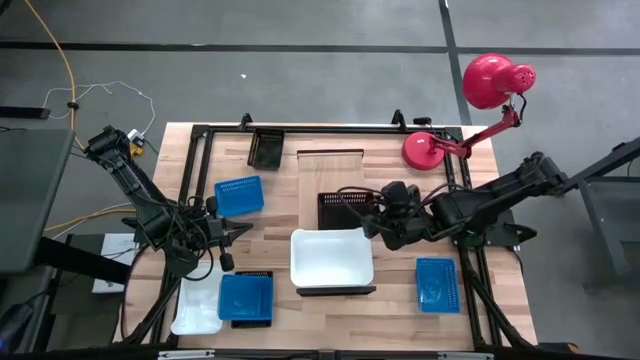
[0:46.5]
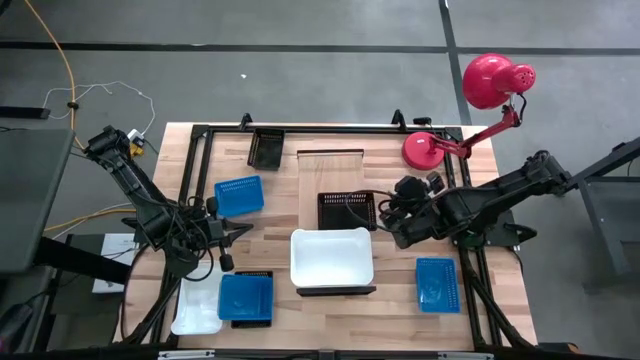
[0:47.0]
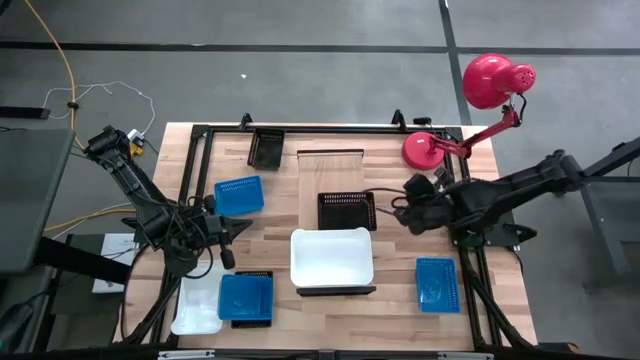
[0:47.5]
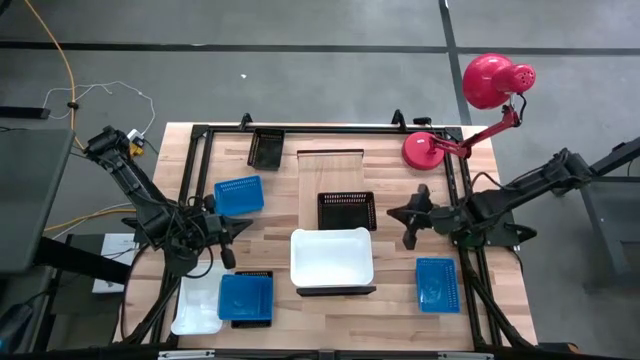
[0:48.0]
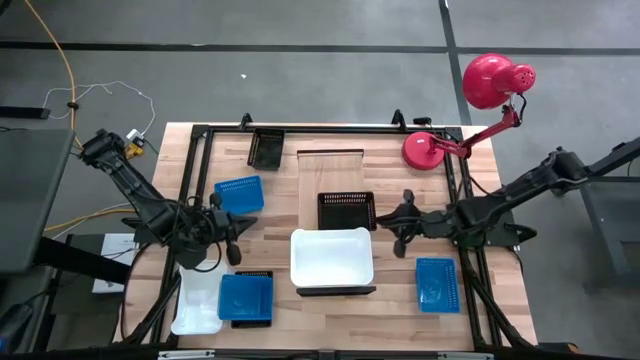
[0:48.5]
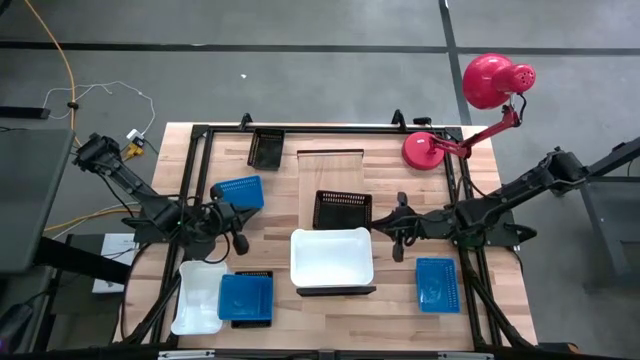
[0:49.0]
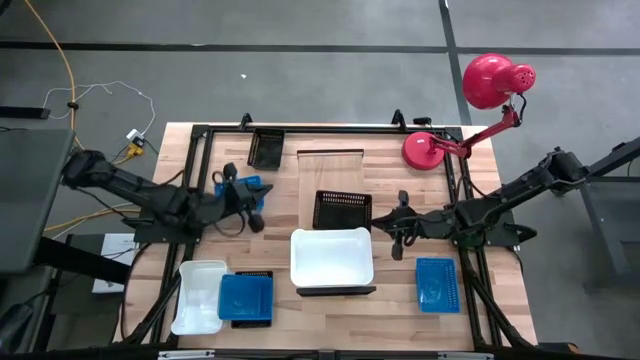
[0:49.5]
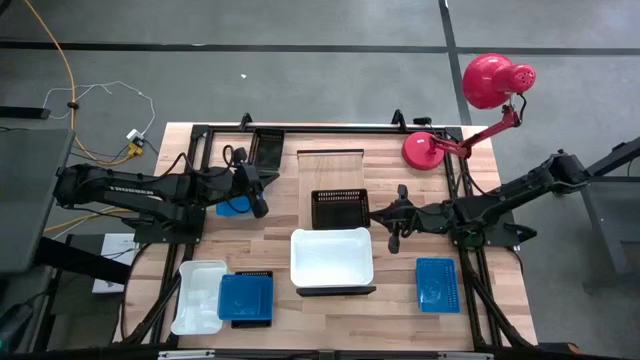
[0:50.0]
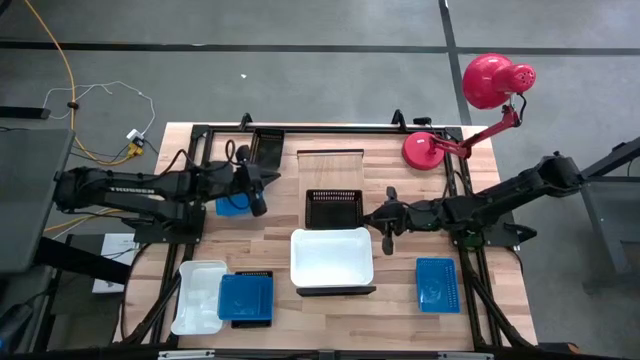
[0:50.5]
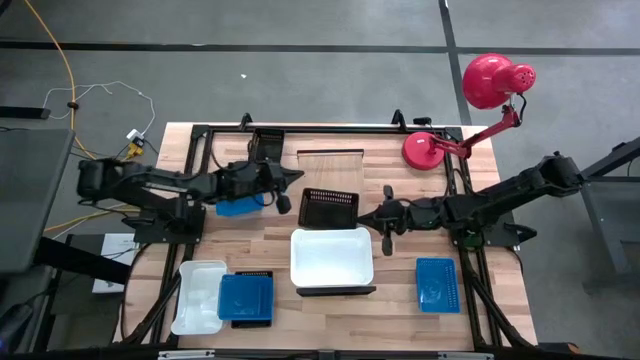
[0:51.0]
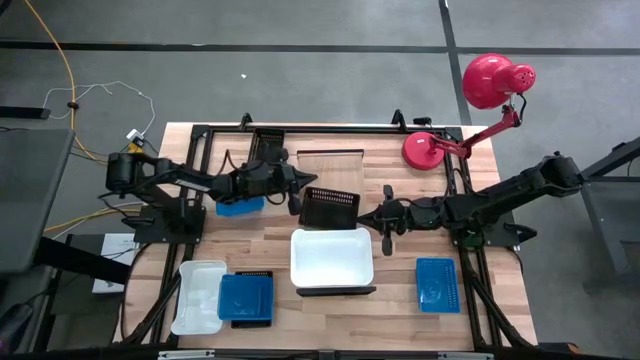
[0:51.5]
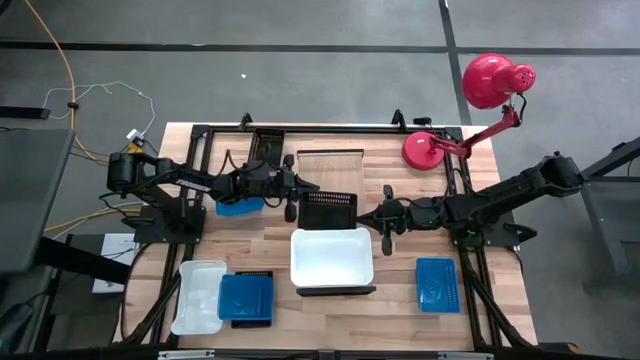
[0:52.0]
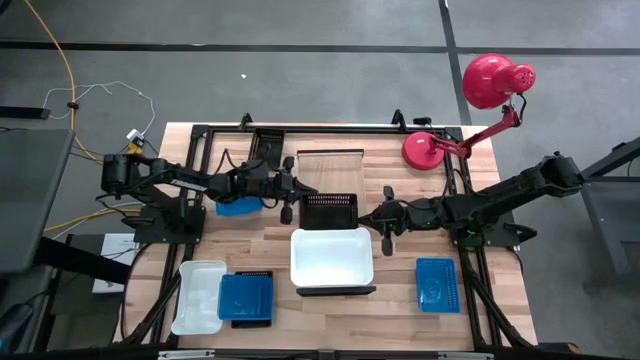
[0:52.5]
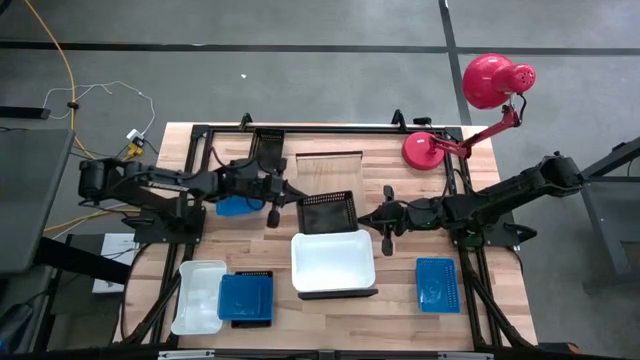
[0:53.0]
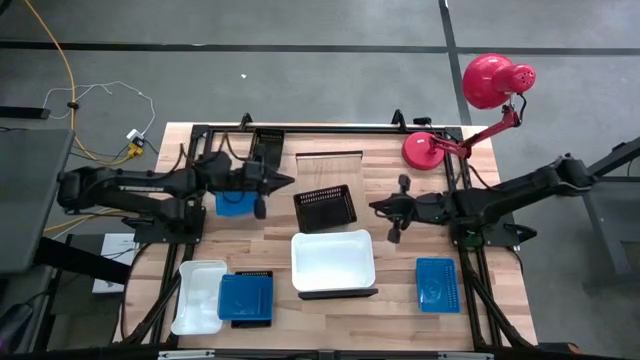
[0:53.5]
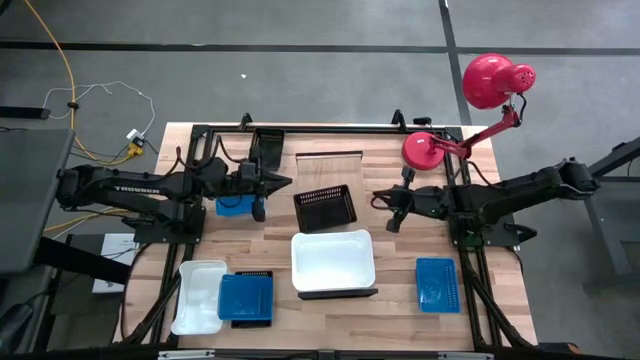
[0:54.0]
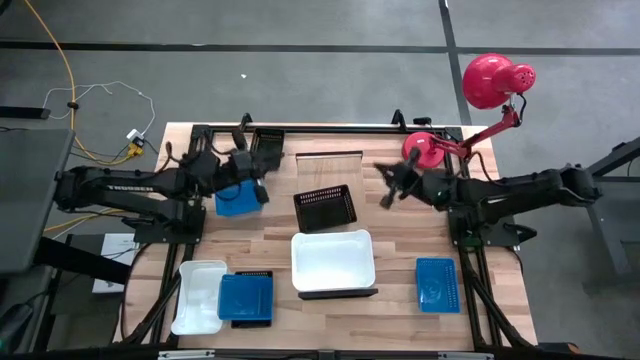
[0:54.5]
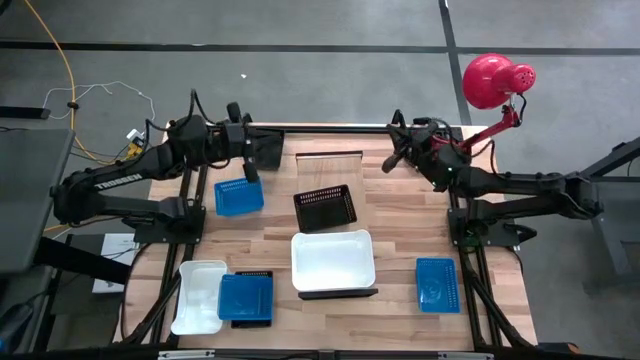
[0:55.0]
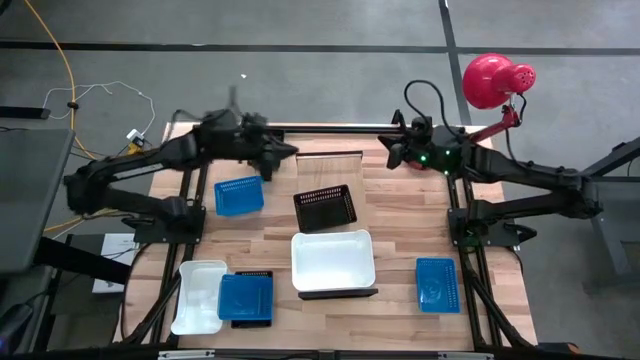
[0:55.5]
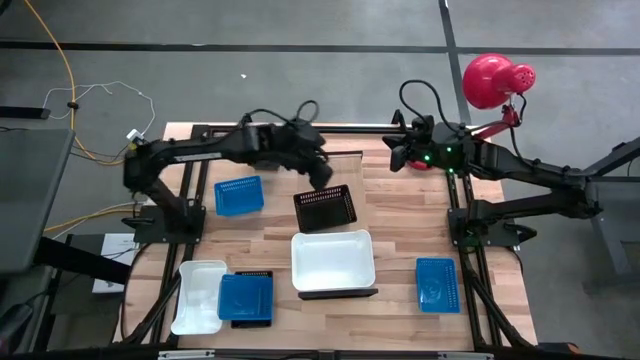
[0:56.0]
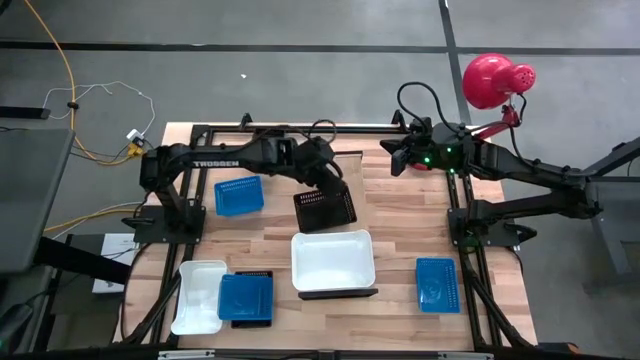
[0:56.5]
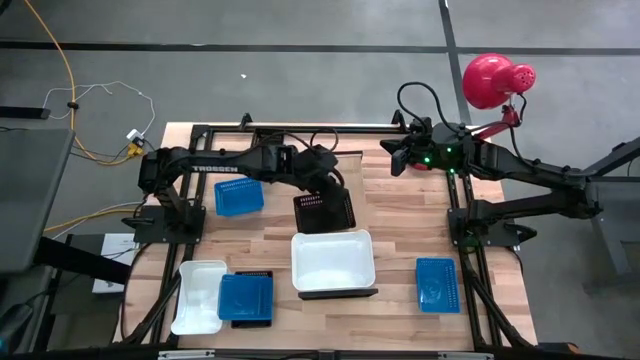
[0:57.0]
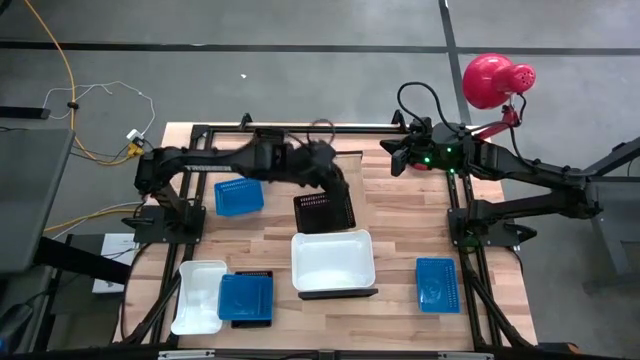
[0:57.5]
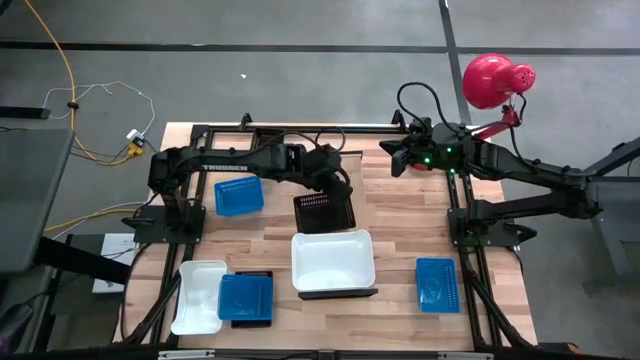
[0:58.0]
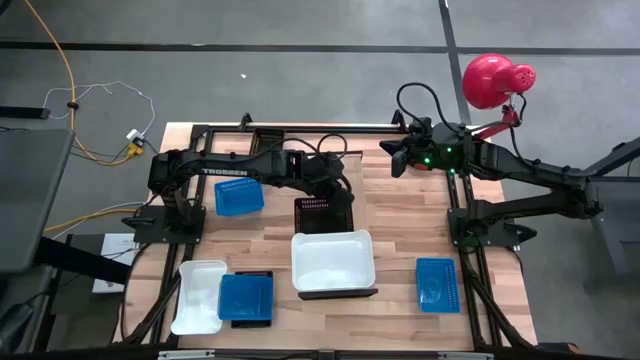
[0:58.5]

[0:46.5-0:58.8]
Task: Stack baskets on shelf by color
Put the right black bin on the shelf

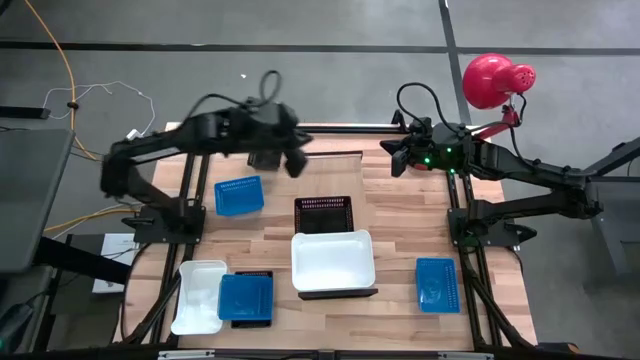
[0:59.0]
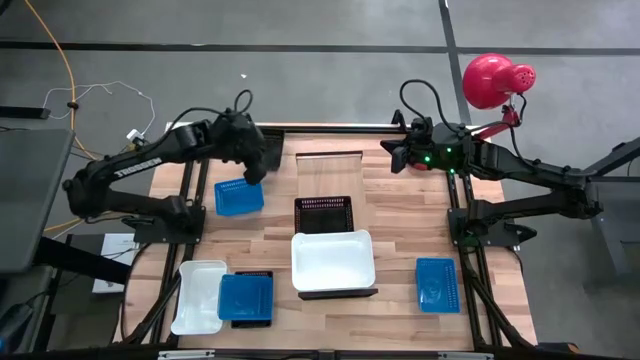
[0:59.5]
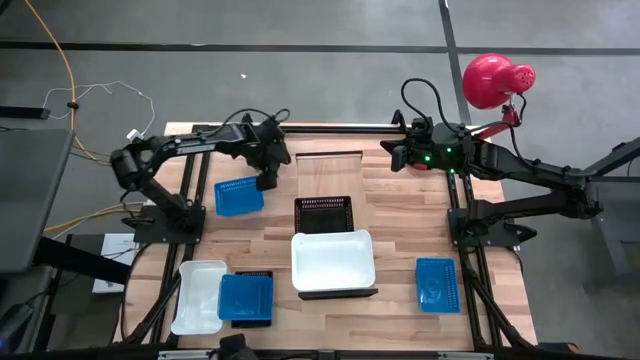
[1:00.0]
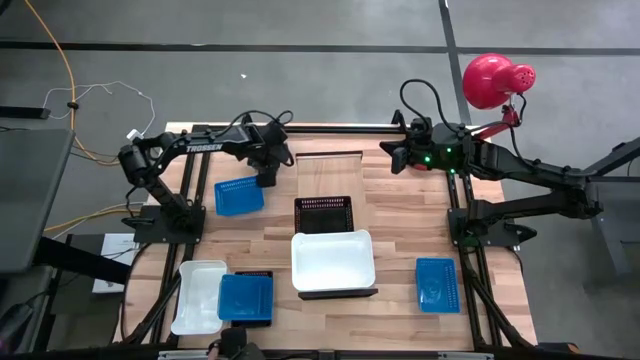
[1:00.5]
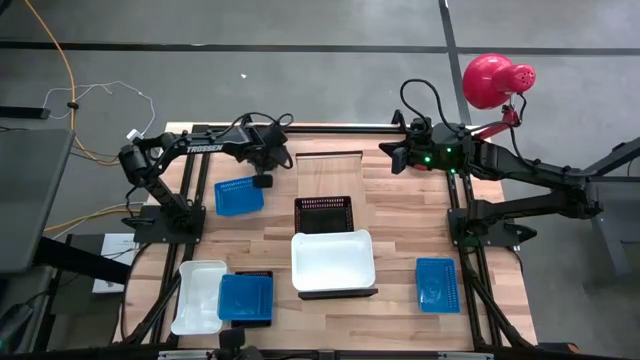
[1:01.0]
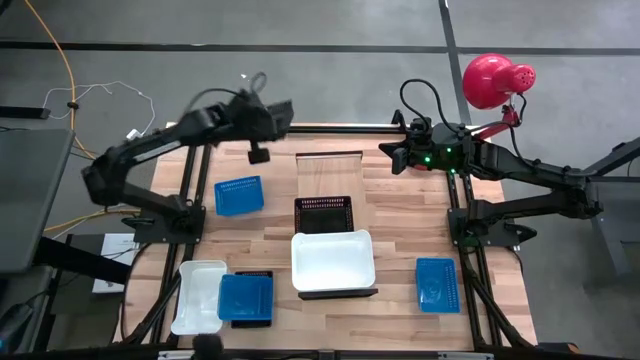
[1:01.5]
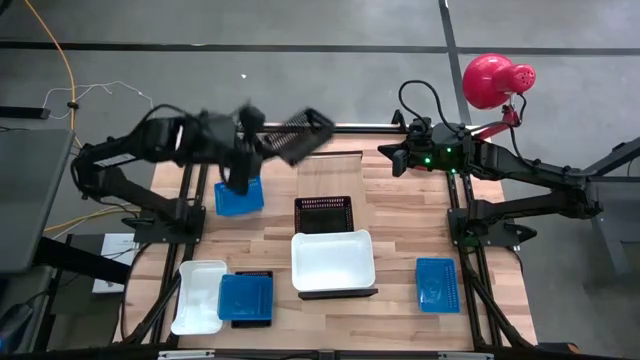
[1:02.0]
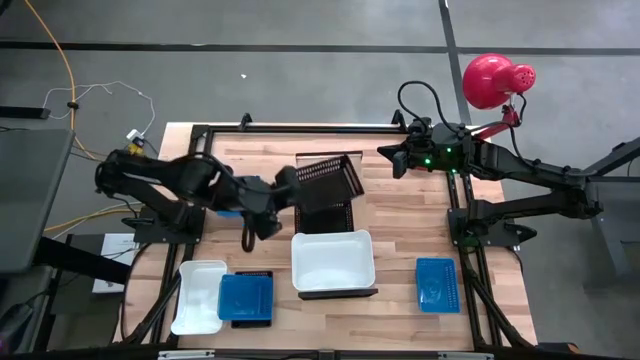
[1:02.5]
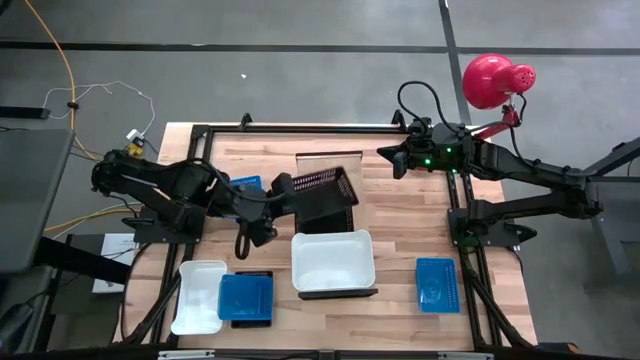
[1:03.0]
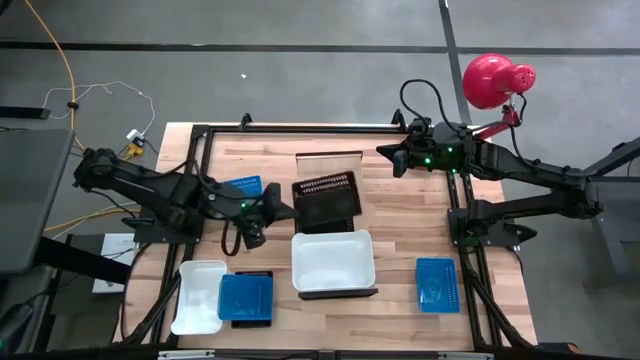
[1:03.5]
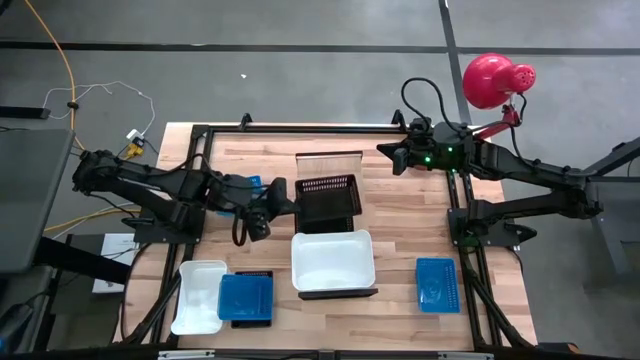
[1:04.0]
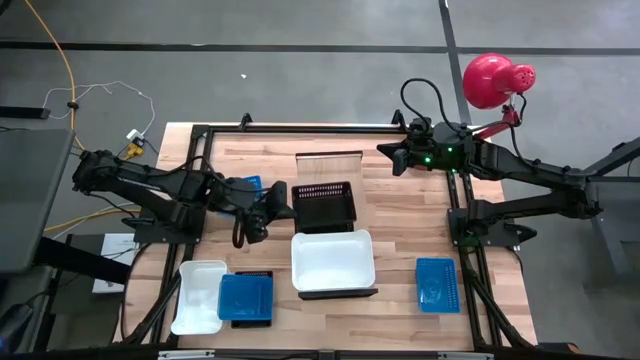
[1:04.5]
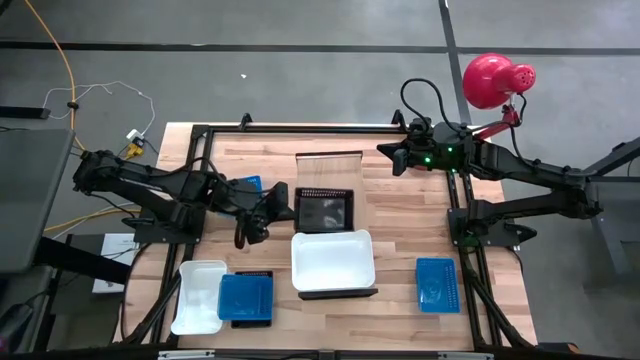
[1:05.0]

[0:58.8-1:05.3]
Stack the top black bin on the black bin on the shelf

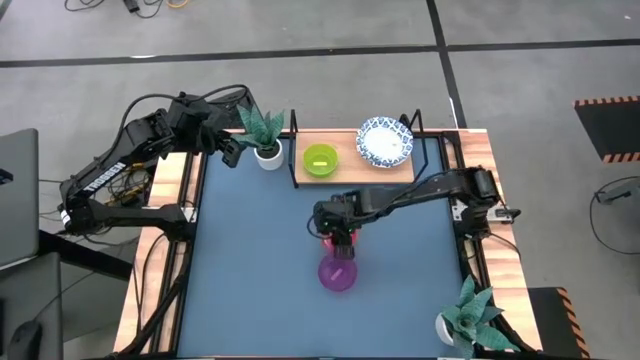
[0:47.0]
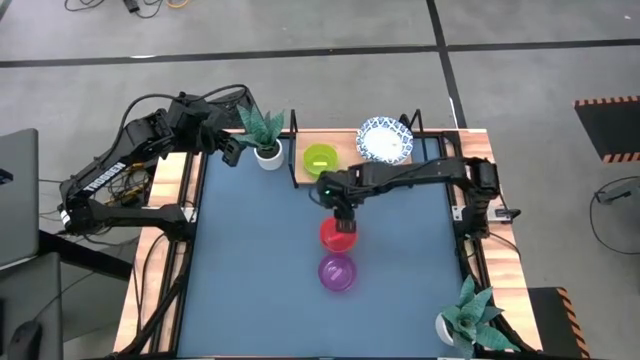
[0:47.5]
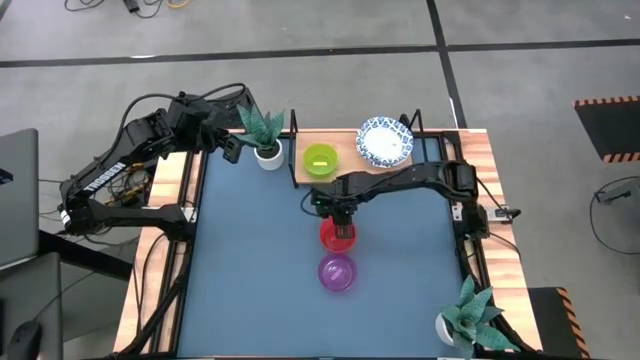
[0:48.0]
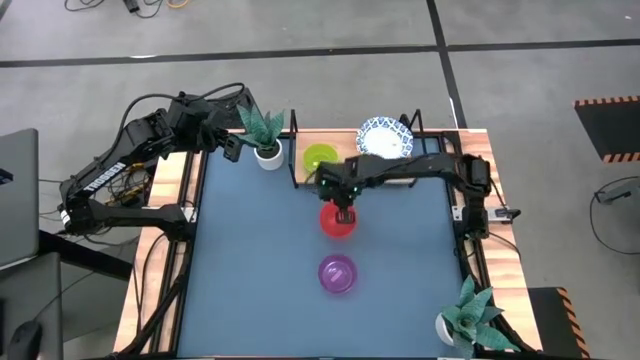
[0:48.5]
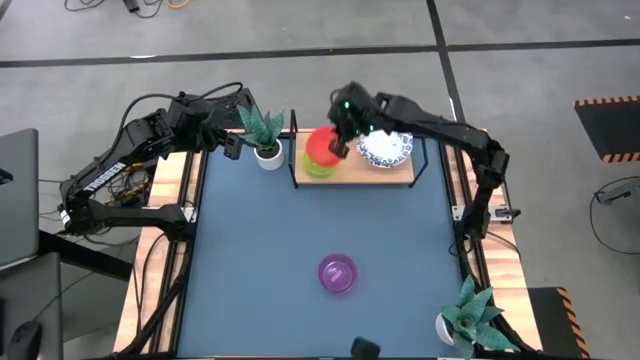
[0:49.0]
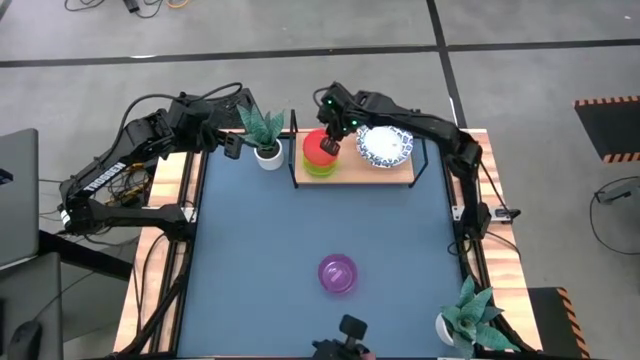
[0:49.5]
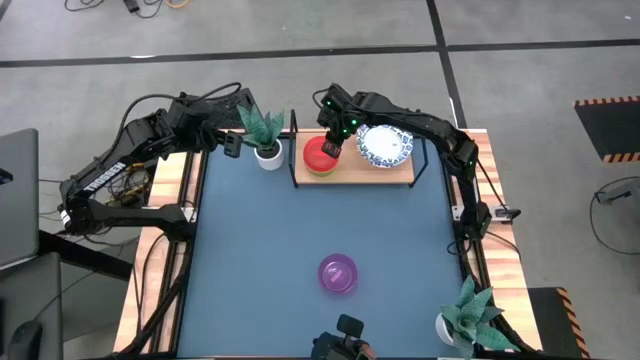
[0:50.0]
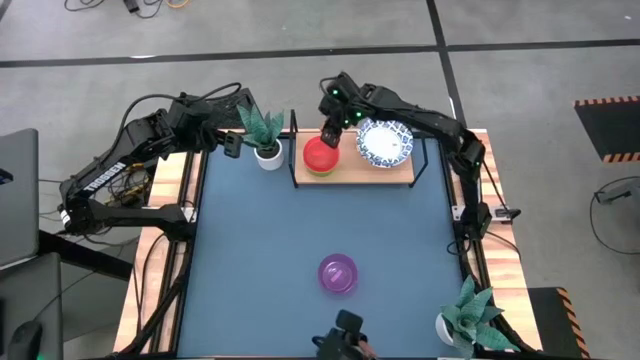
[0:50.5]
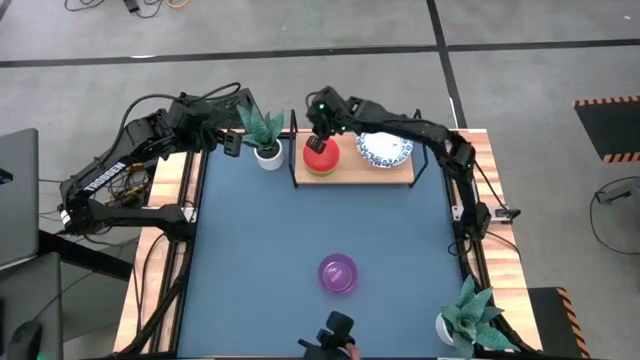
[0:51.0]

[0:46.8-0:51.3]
Task: Place and stack bowls onto a shelf
Stack the orange transparent bowl on top of the yellow transparent bowl on the shelf
